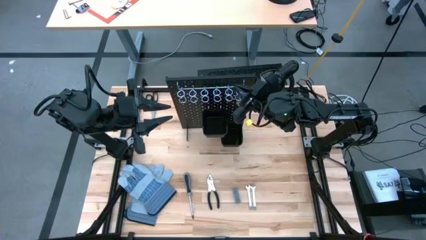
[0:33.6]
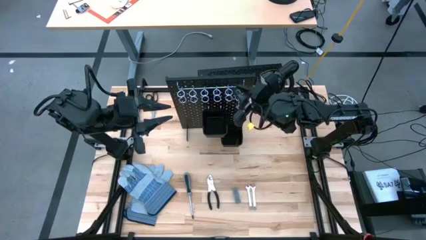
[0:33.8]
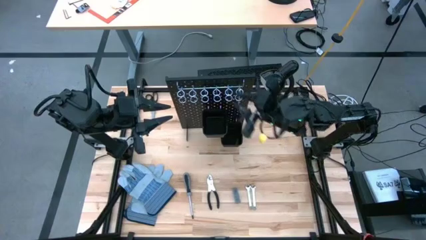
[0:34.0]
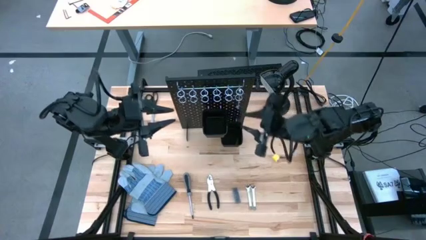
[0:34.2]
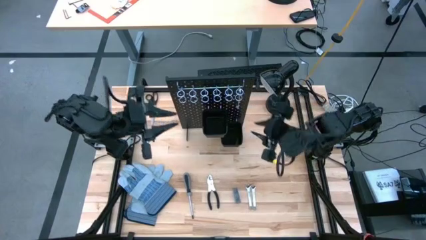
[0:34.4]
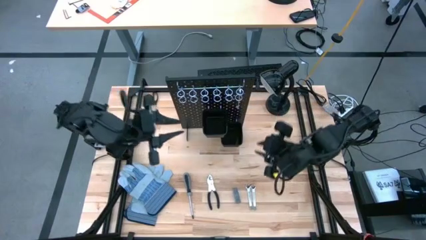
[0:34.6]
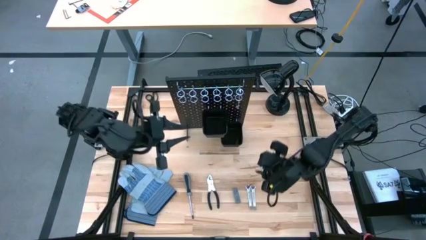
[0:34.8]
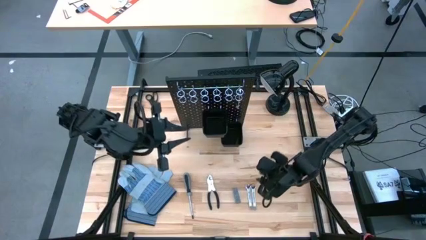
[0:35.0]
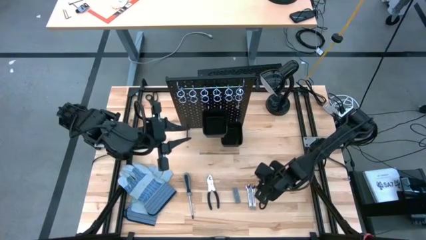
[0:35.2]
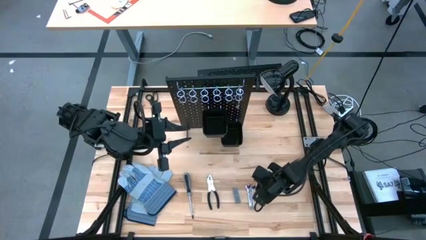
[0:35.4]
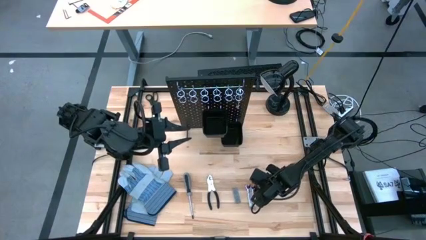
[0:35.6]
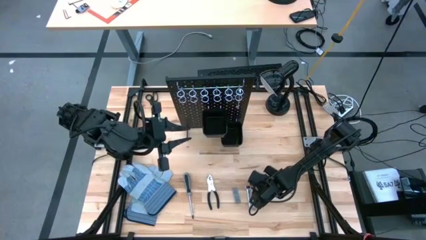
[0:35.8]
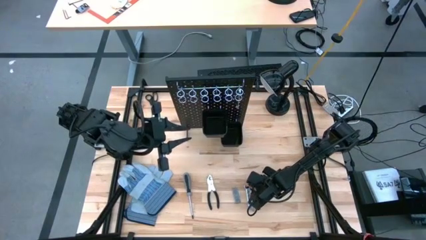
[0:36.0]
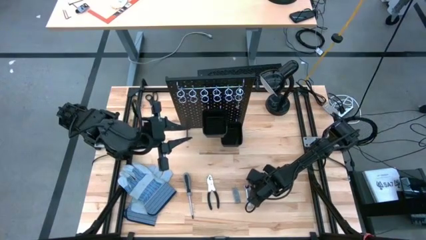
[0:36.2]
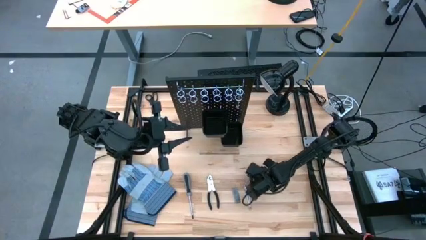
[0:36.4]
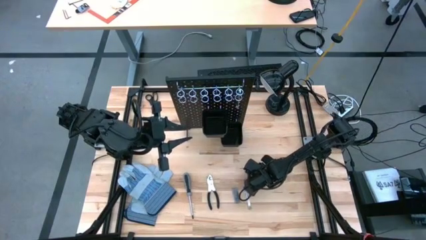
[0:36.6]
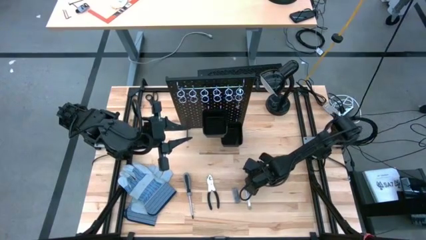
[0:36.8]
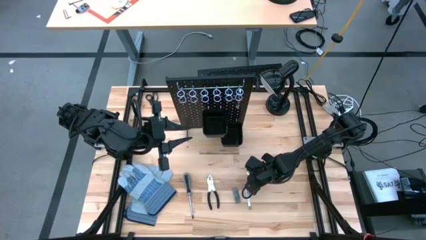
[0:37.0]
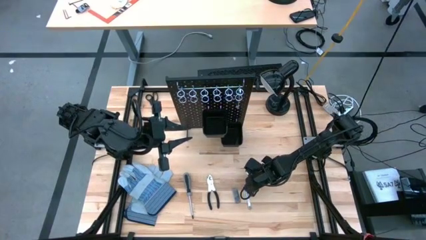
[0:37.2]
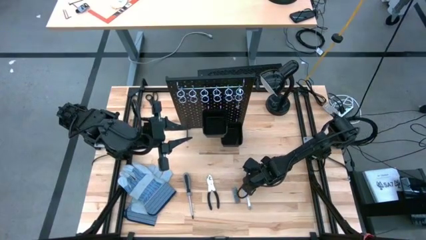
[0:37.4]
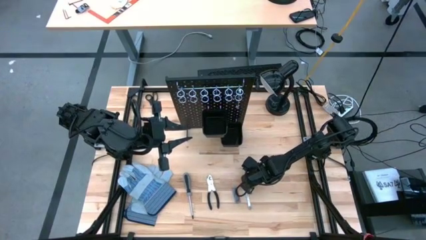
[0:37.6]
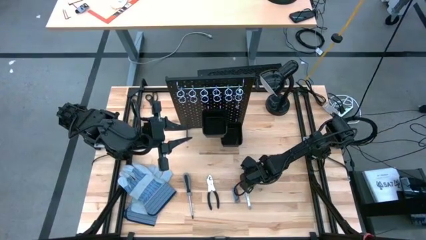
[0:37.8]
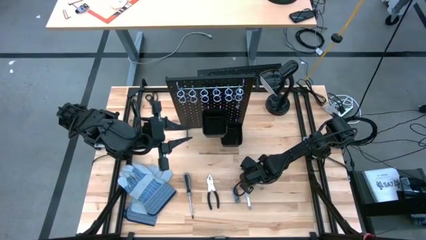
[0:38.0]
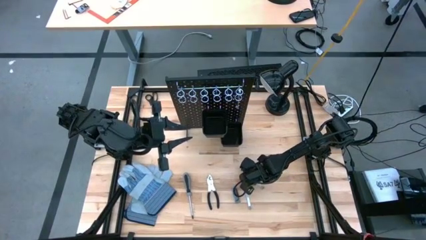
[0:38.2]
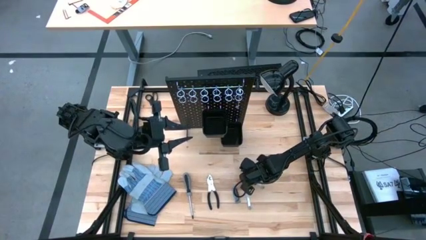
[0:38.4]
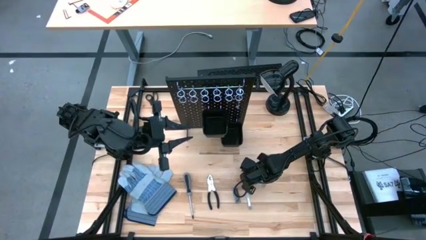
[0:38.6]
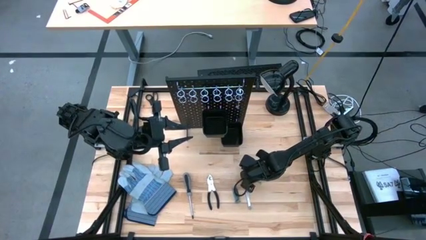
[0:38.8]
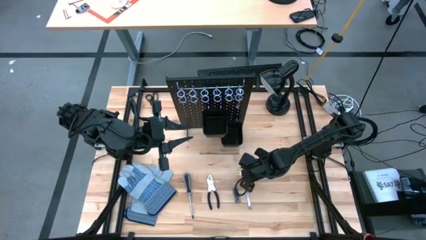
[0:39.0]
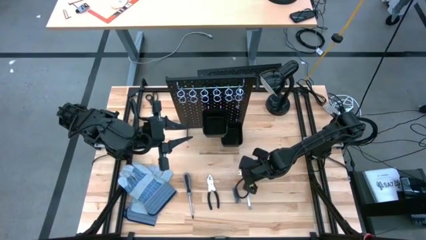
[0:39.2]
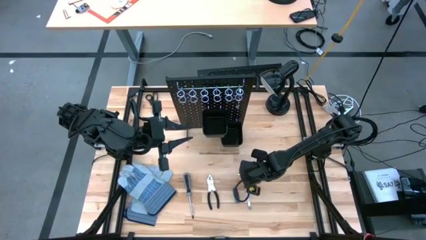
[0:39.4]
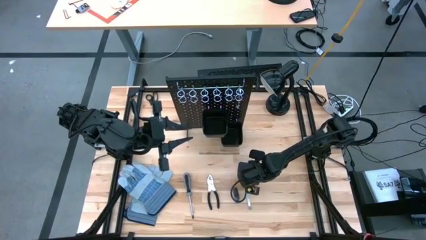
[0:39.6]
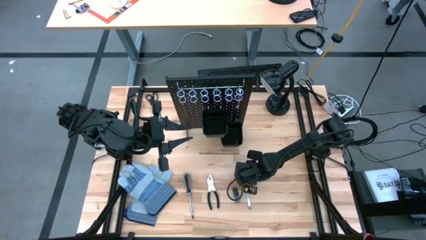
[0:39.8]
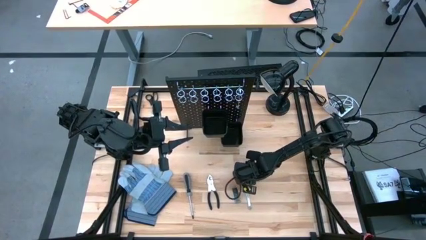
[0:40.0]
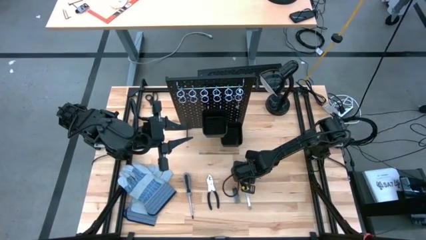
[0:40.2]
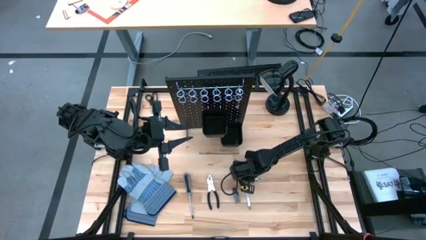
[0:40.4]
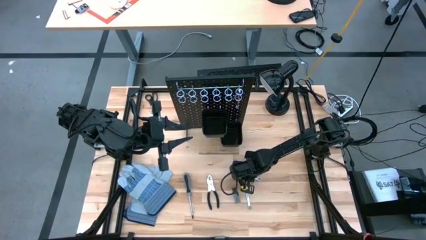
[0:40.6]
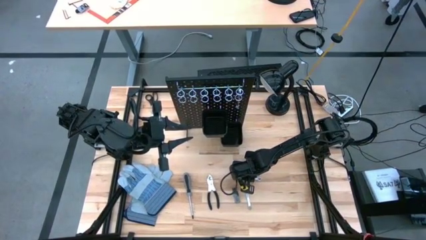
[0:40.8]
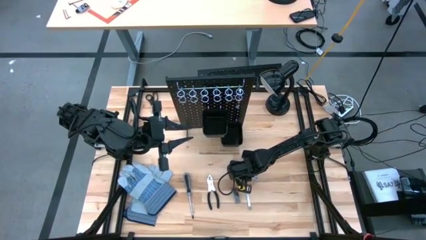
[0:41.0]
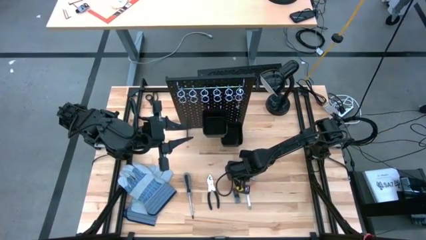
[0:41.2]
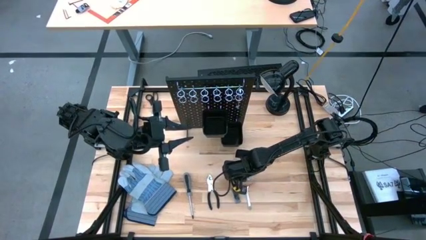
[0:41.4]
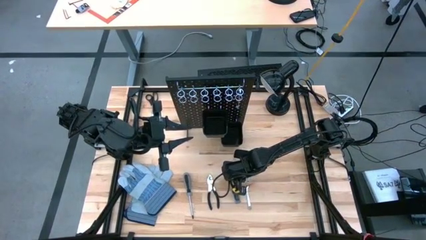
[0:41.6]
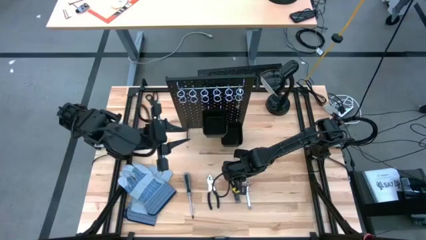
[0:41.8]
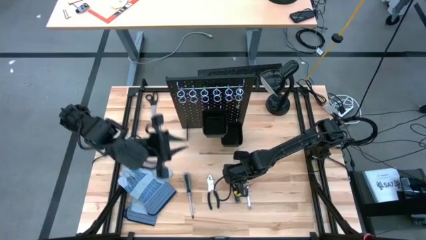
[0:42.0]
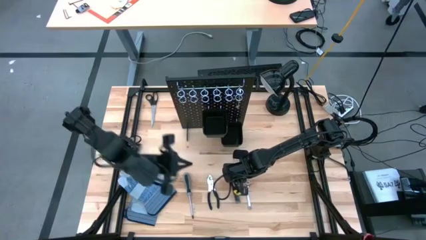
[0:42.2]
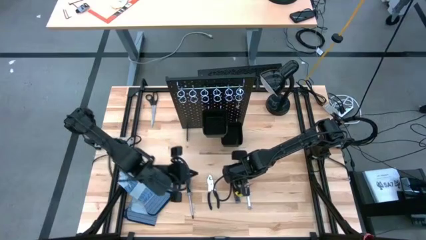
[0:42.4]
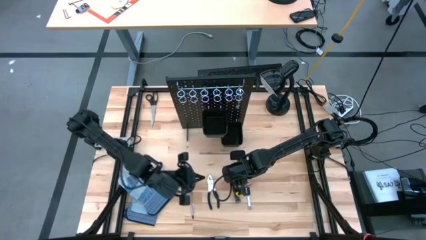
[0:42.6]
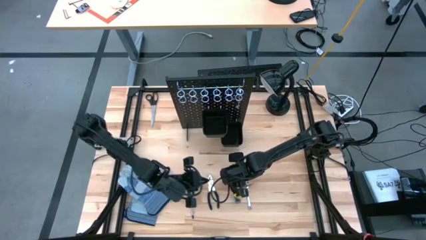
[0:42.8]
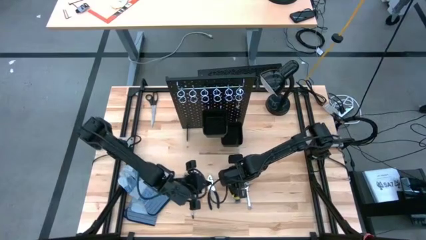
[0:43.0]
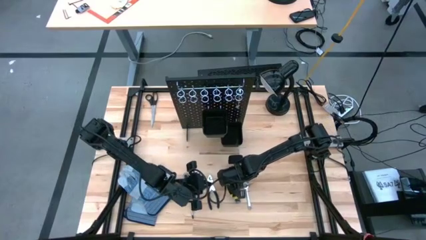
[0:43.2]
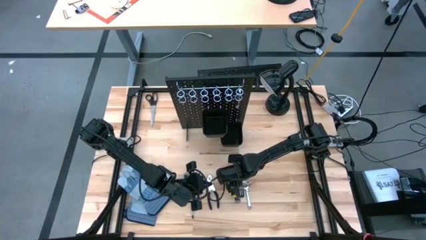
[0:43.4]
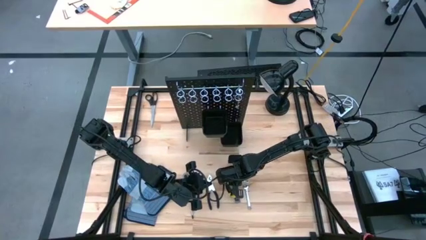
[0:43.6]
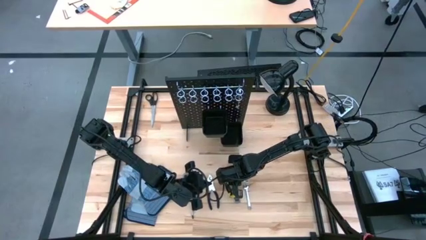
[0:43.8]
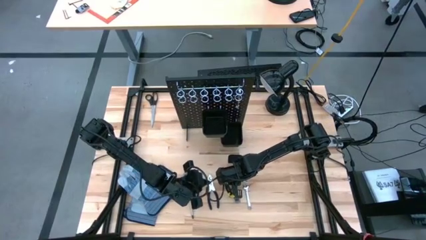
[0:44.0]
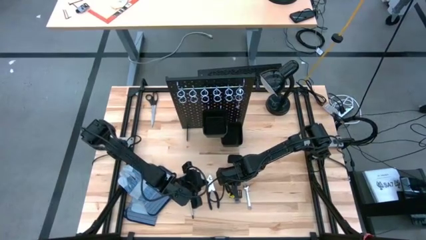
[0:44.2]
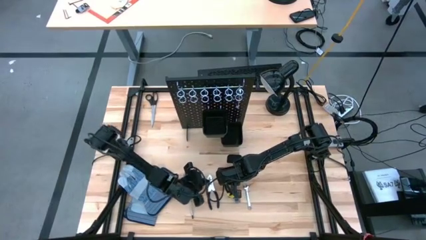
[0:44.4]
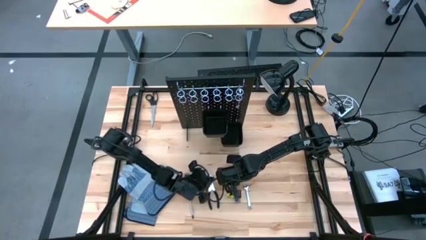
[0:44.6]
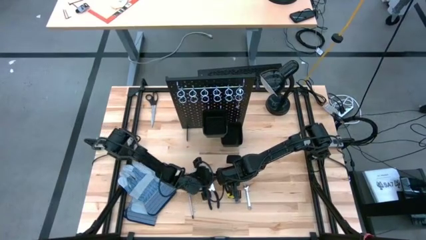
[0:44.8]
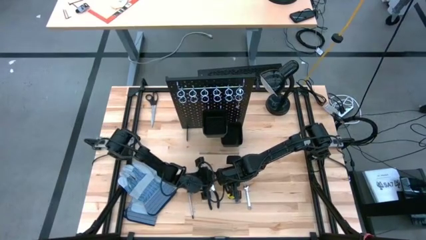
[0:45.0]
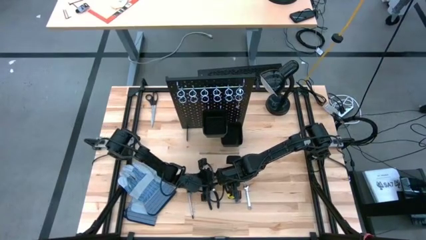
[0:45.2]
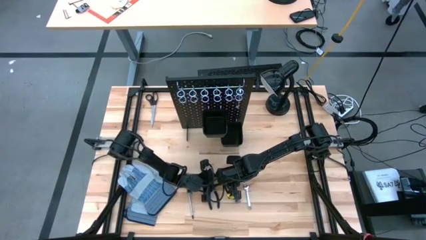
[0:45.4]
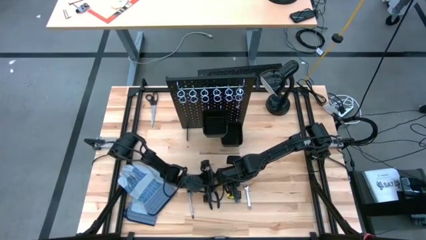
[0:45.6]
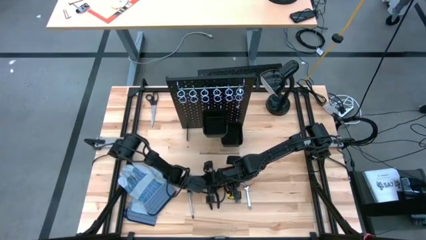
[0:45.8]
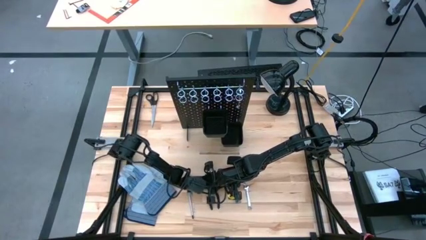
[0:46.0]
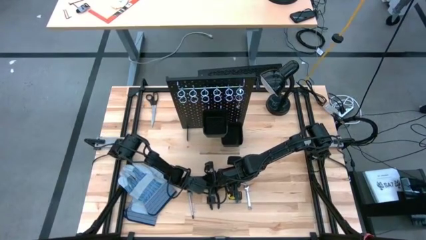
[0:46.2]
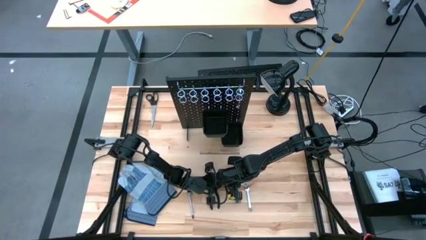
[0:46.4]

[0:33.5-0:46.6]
Task: Hang tools onto peg board
Hang the right silver wrench on the black pegboard

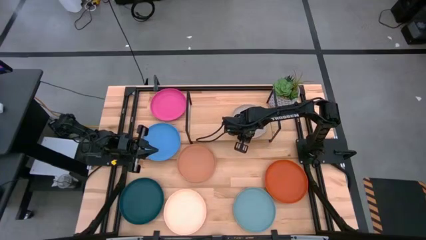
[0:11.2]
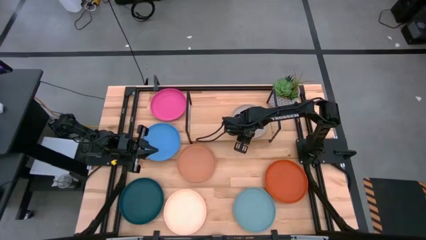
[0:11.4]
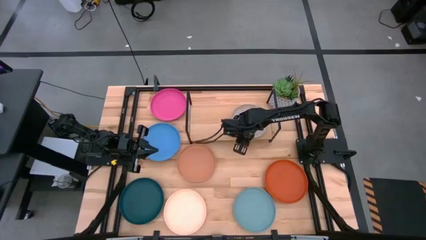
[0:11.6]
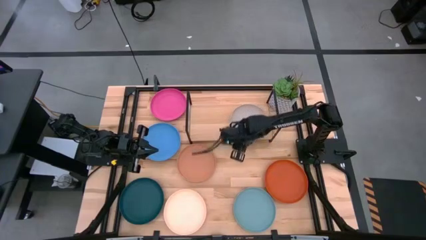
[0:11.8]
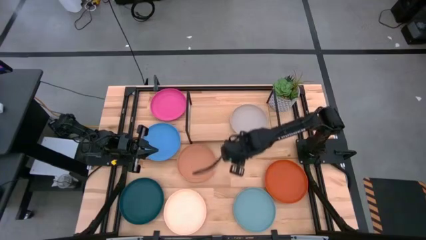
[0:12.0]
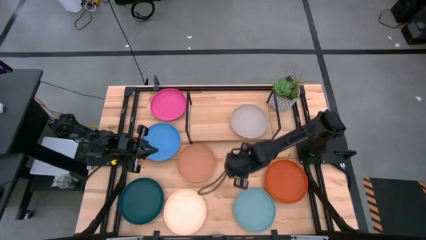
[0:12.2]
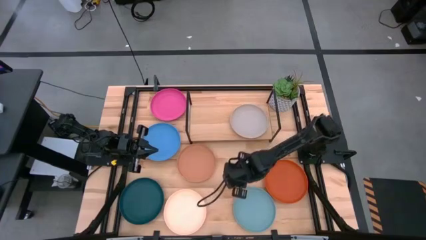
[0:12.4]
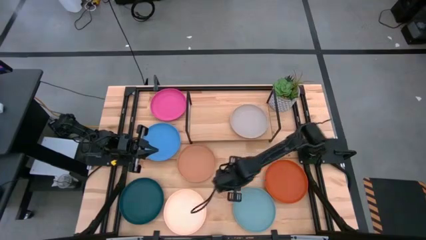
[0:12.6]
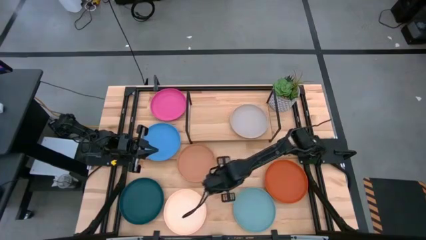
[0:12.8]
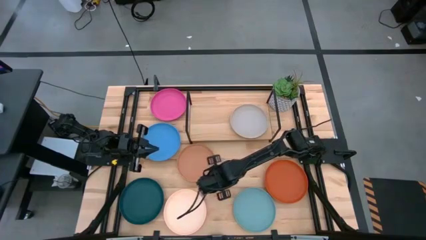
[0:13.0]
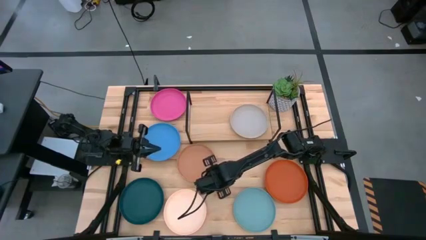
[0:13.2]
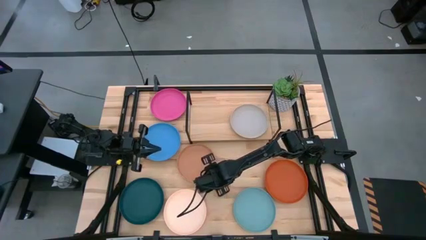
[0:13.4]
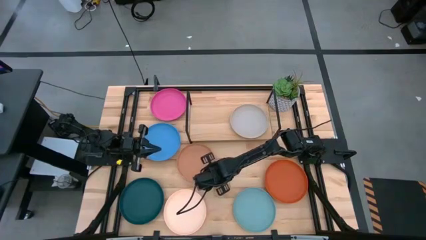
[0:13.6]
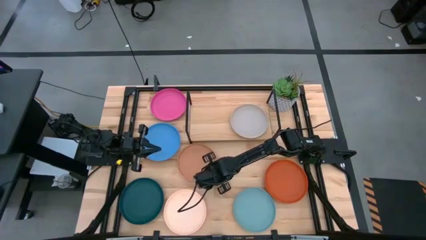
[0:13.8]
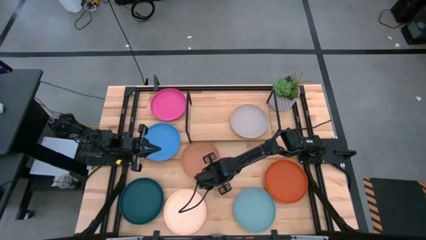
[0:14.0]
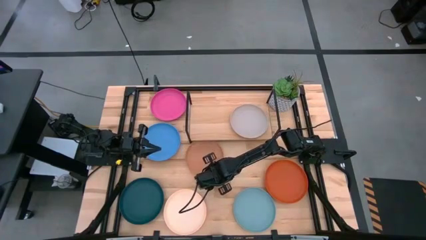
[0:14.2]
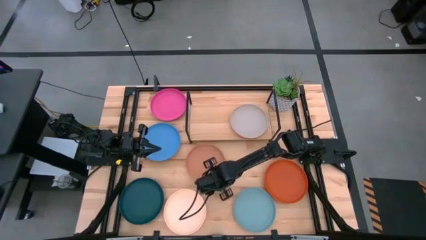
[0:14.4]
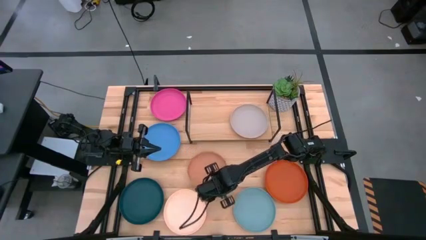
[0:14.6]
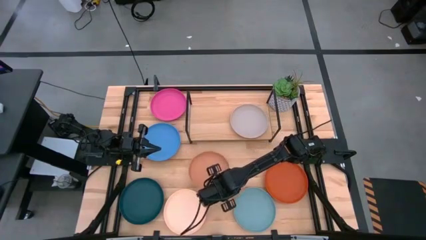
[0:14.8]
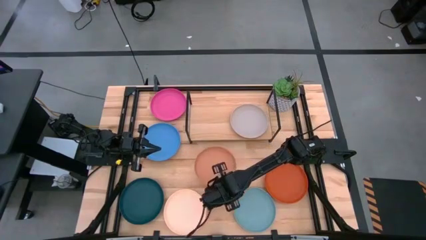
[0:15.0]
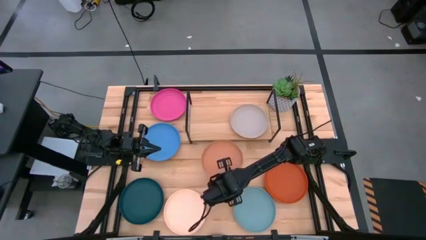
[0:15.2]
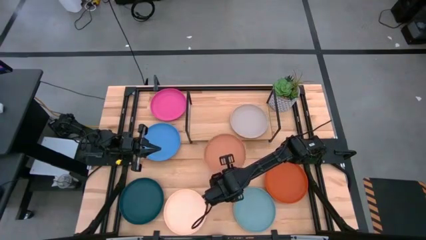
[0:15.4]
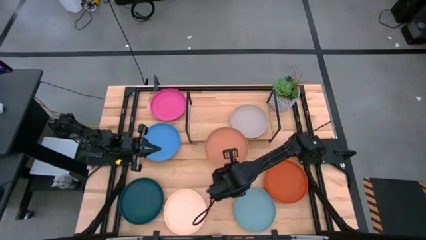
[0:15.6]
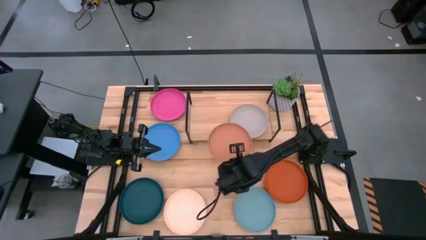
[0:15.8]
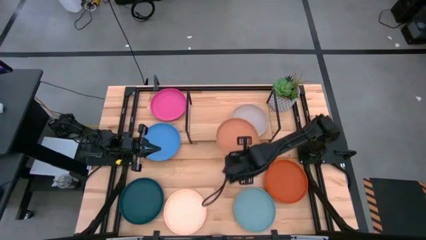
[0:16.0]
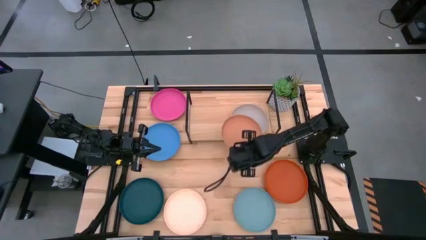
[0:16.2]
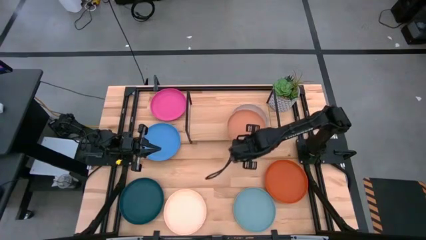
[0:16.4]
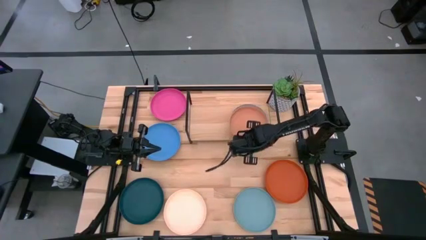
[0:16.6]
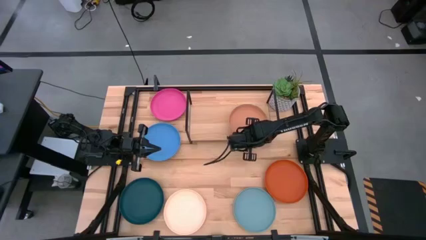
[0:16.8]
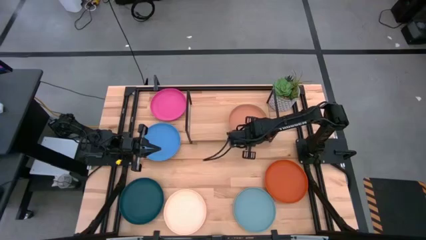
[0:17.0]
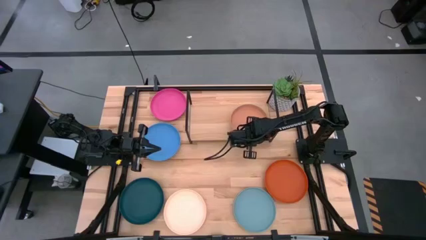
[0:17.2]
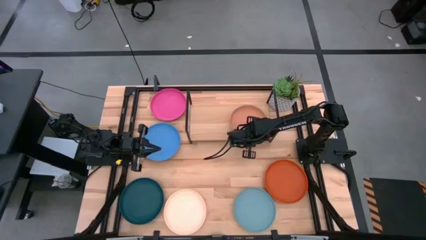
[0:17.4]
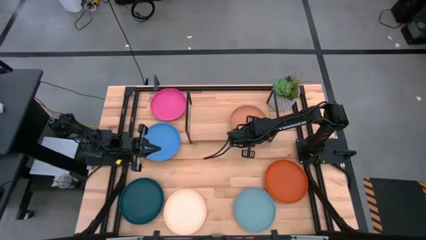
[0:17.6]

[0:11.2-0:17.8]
Task: Place and stack plates onto a shelf
Stack the light brown plate on top of the grey plate on the shelf
